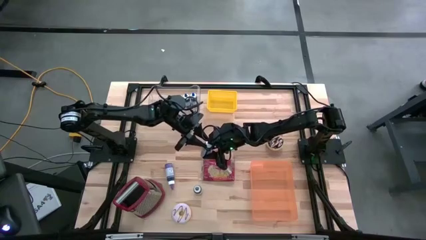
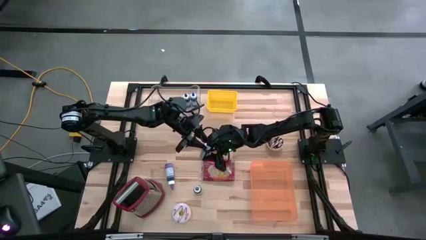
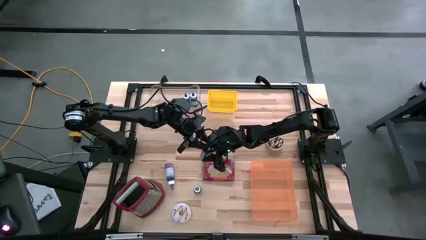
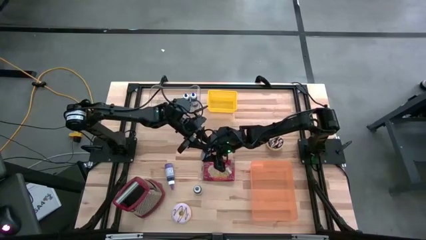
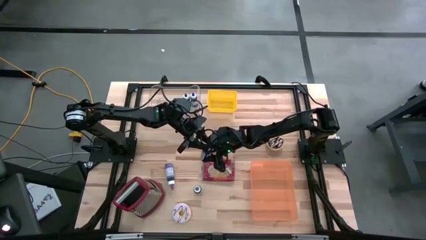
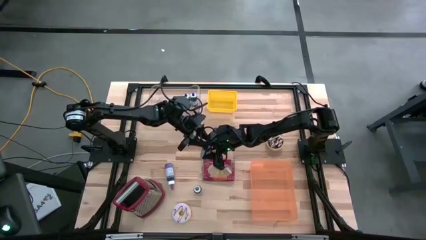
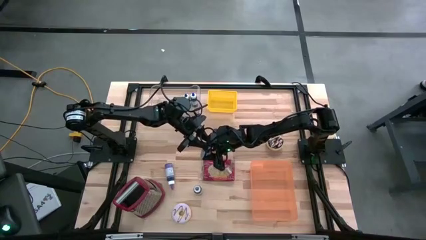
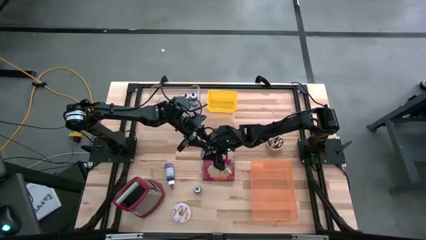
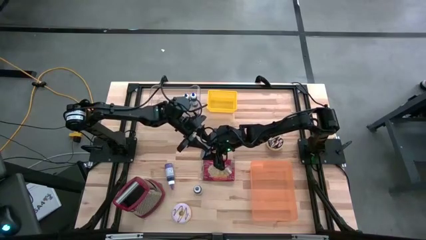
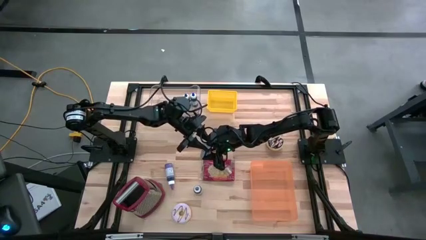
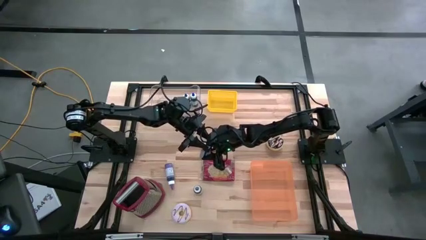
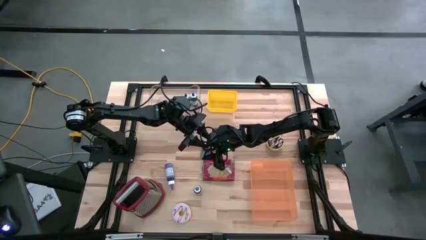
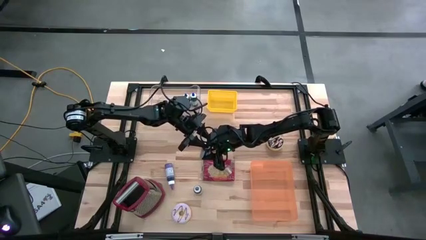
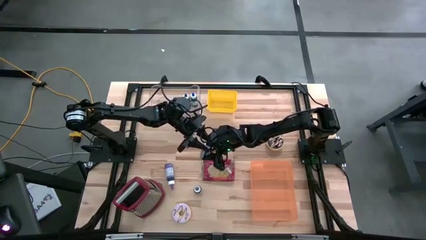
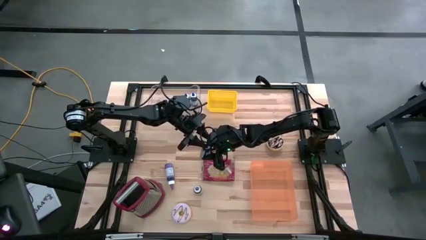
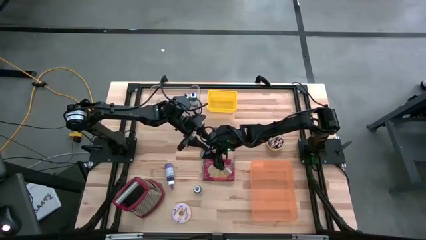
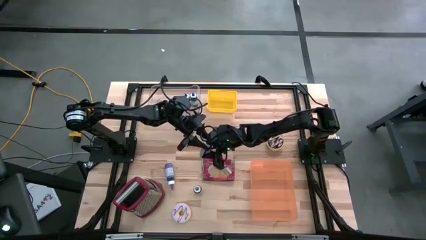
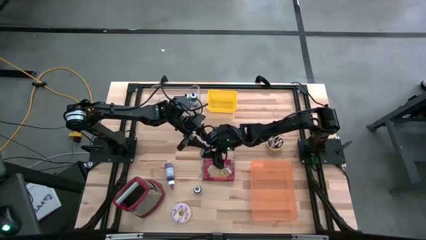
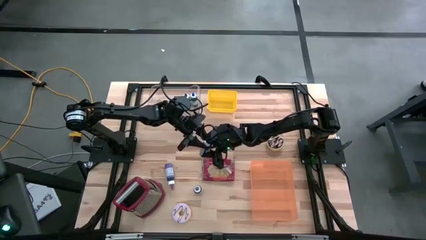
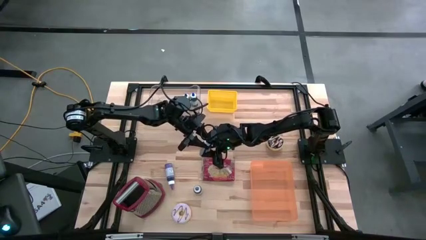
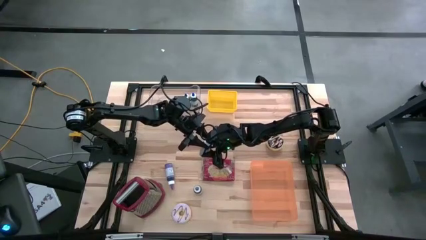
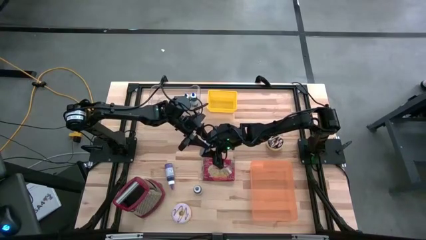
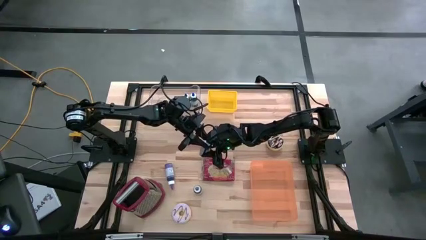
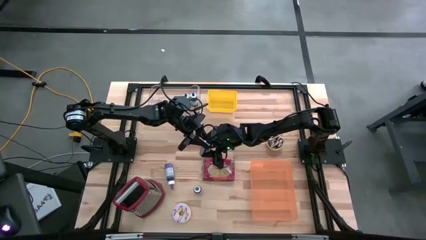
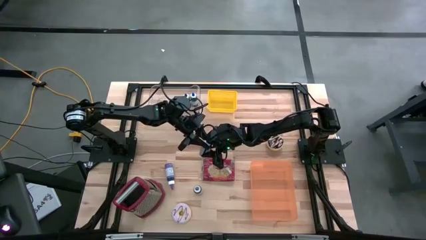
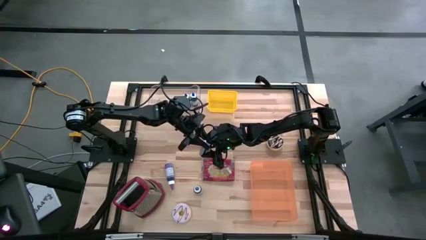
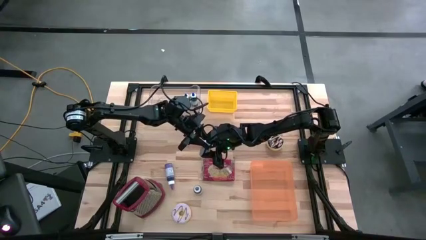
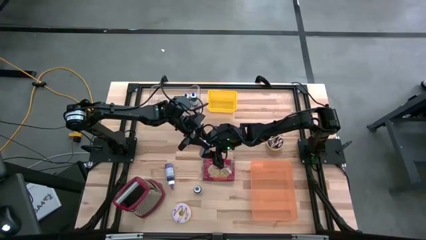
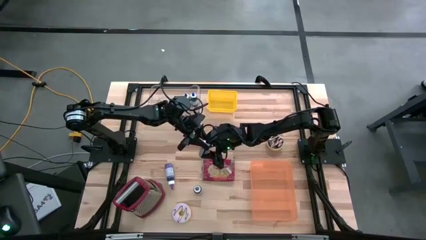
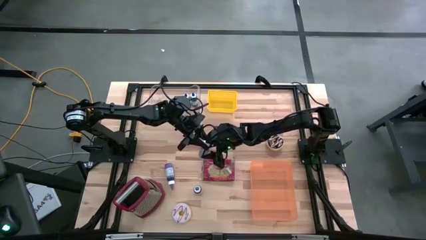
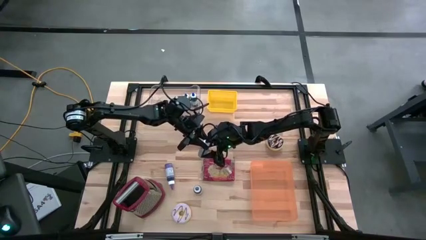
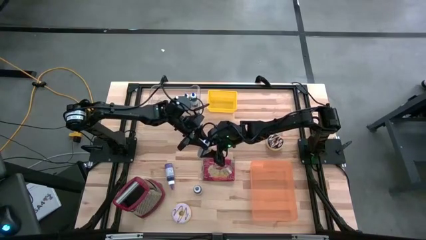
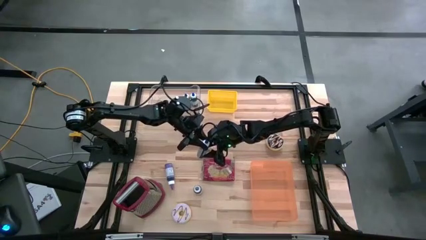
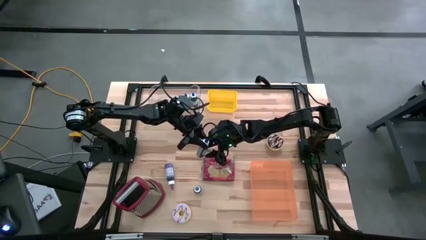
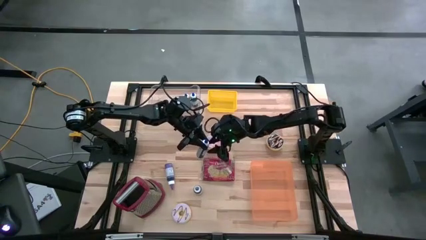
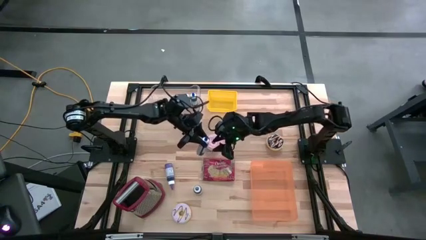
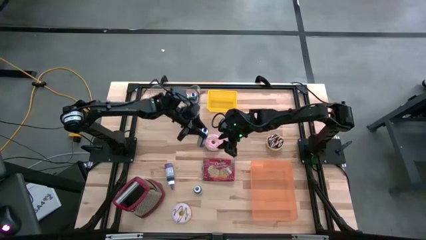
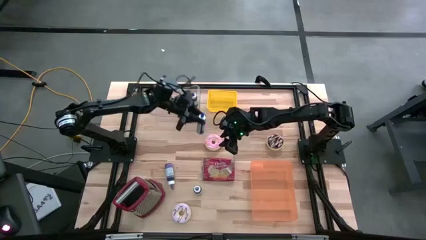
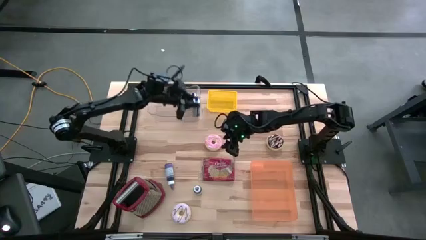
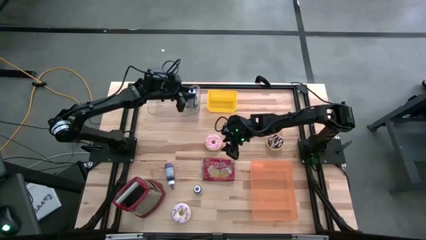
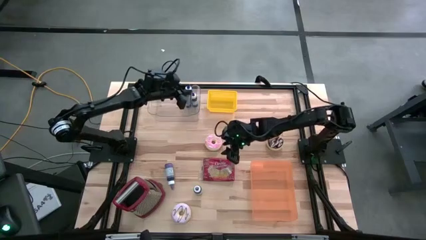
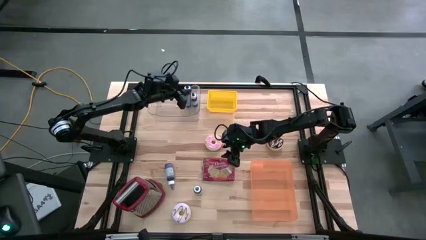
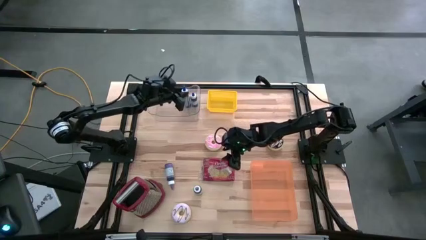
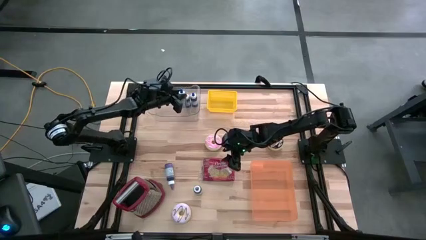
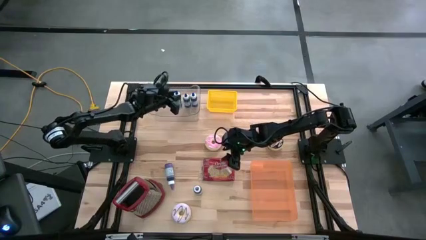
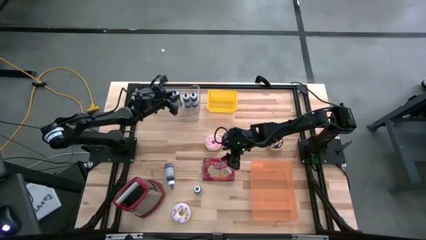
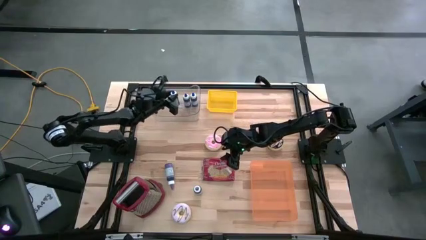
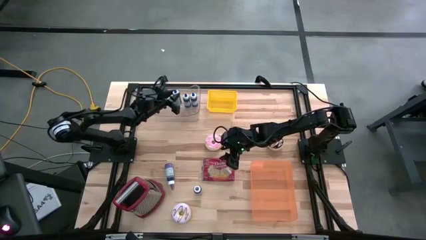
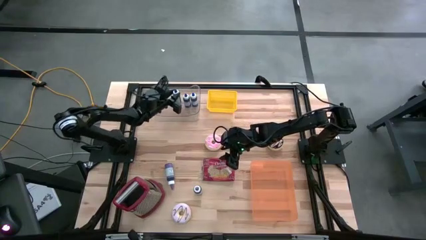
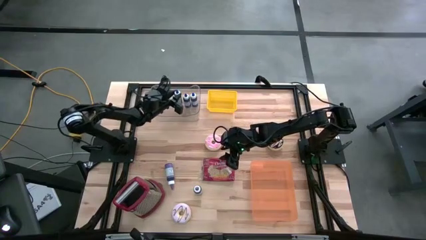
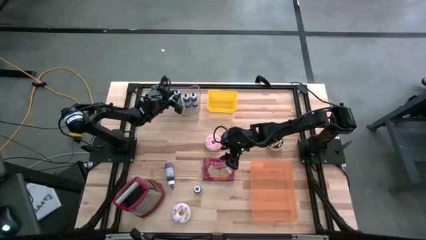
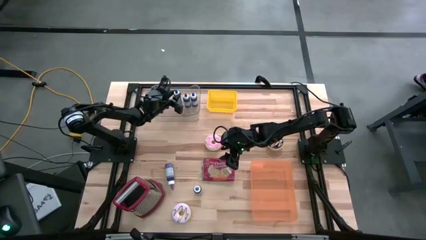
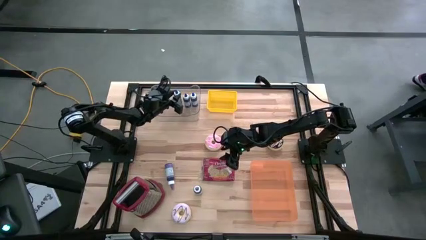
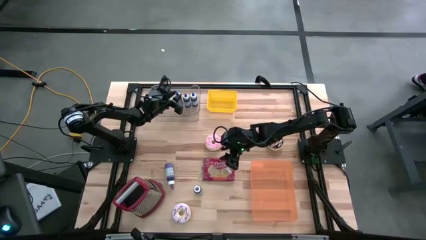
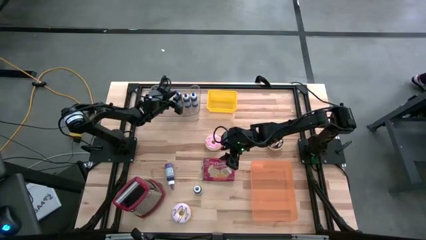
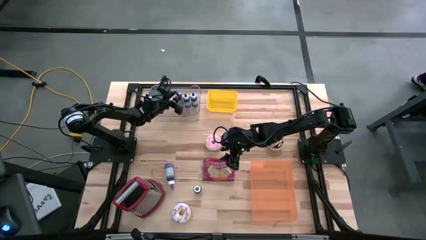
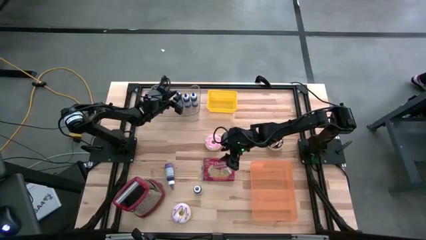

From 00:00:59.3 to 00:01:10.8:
Put the blue food coloring bottle into the transparent bin

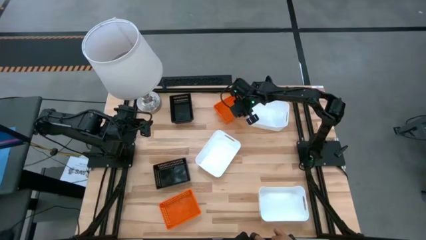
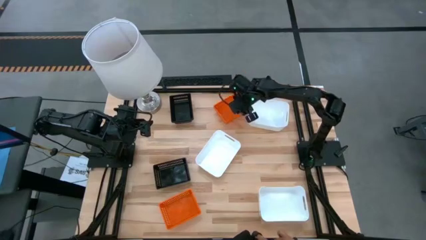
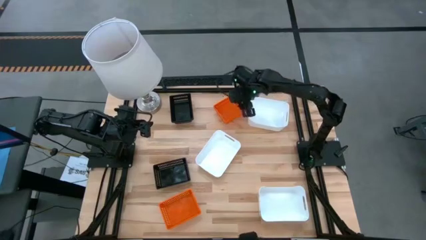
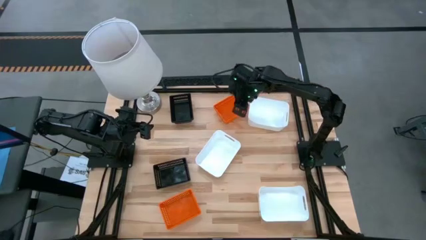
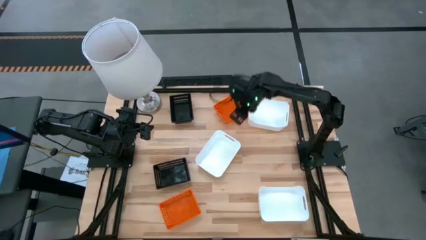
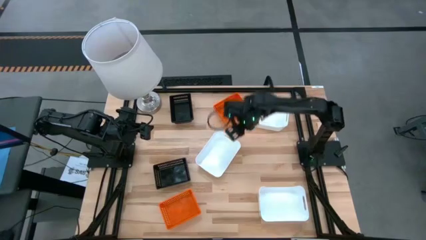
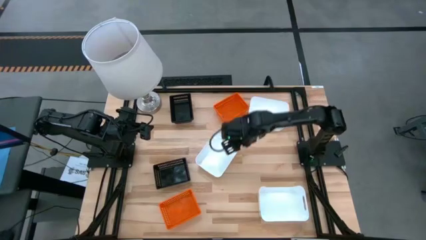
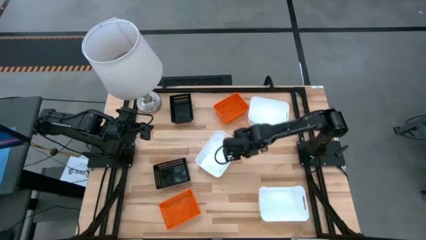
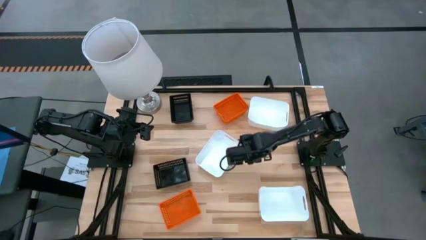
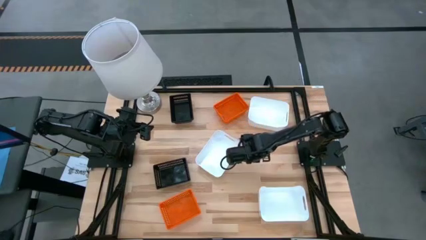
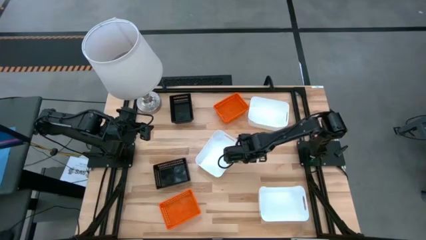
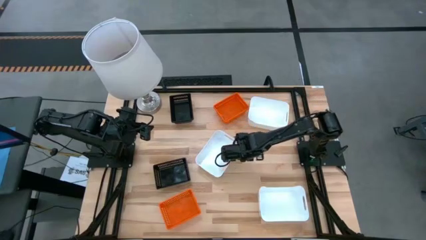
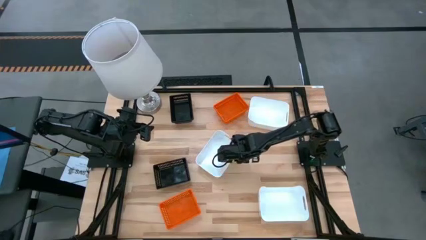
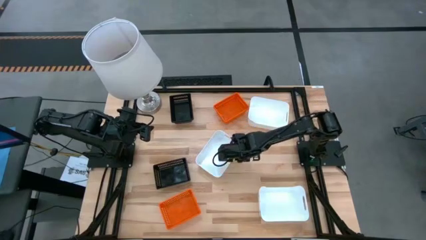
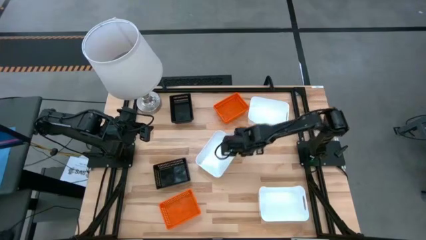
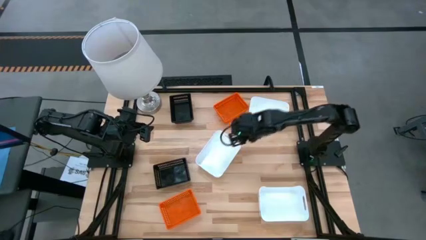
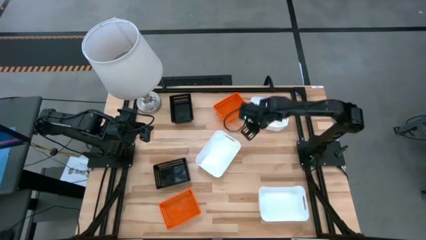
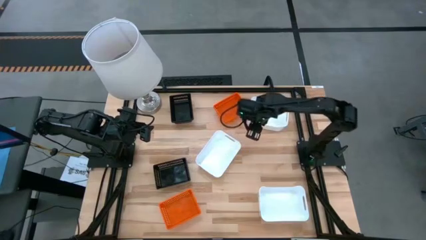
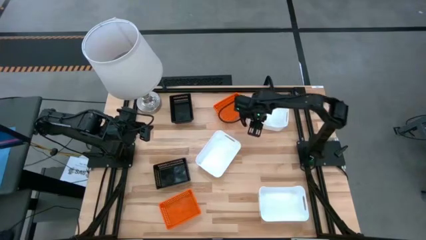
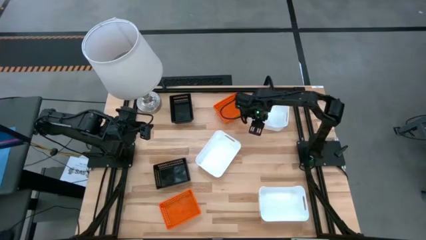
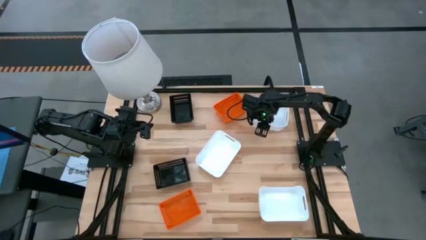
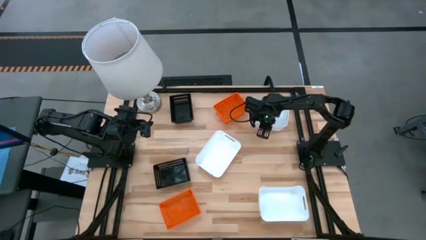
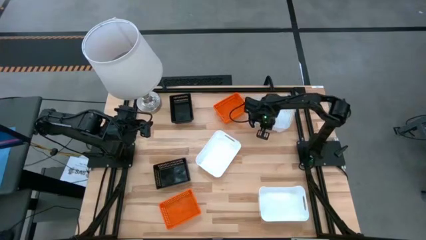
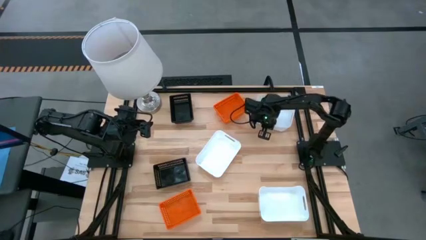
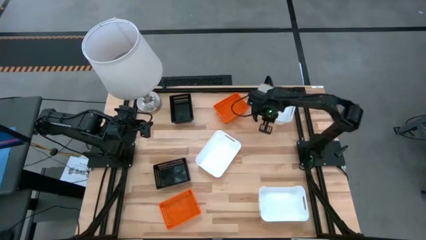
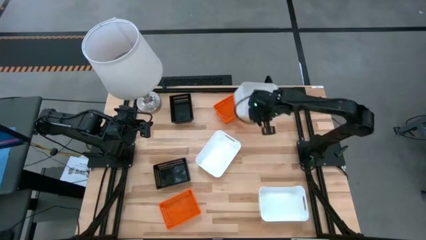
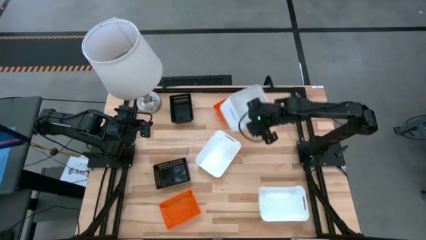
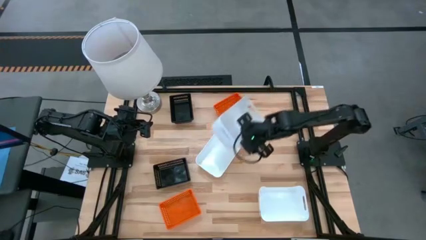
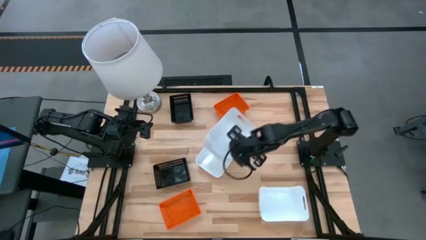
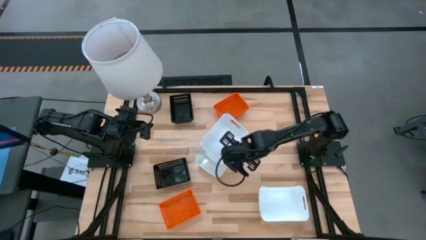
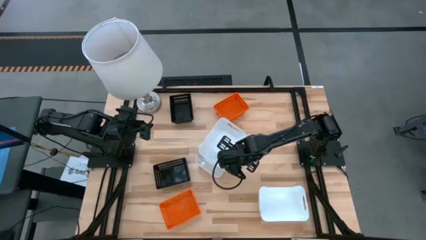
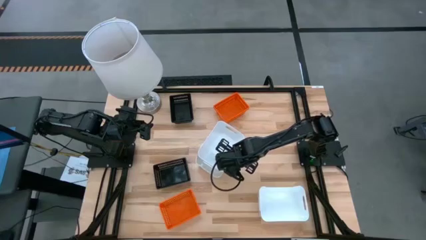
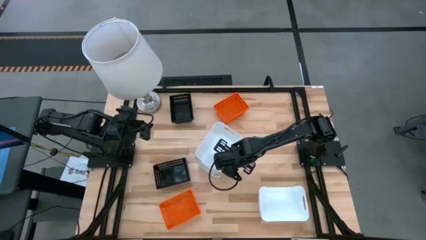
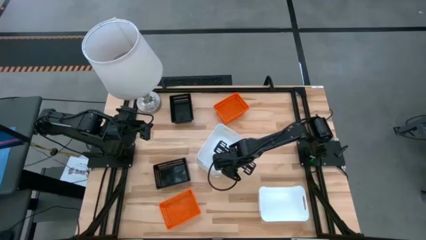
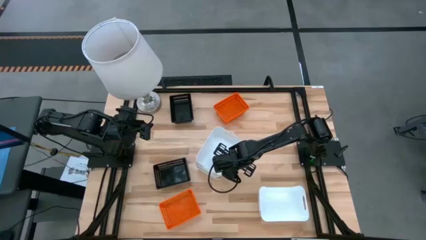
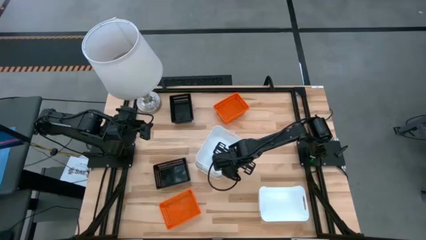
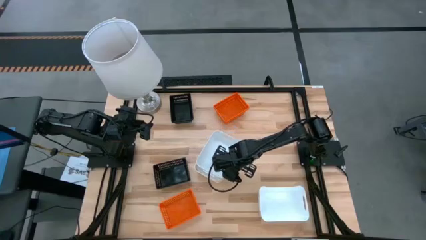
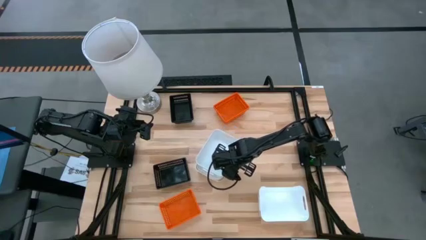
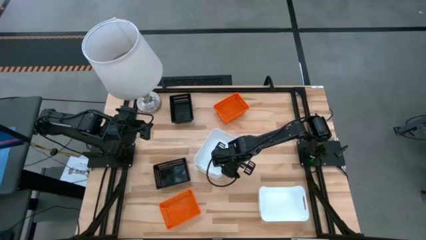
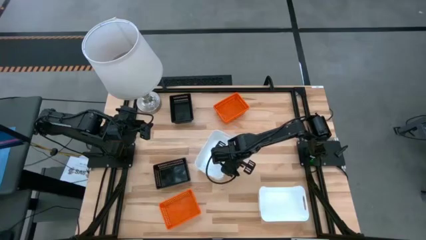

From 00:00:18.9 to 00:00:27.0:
Stack the top white bin on top of the middle white bin
